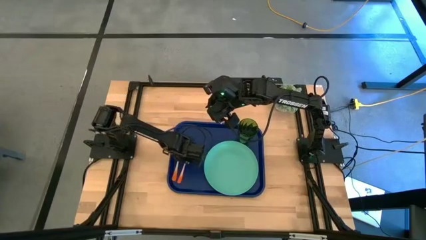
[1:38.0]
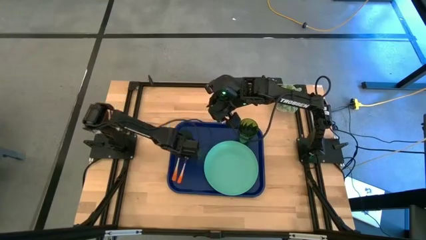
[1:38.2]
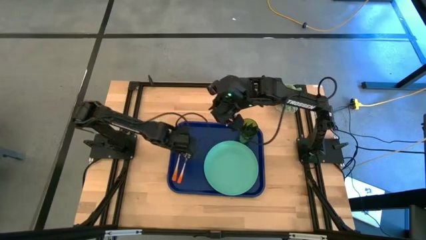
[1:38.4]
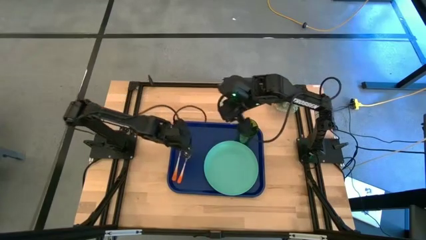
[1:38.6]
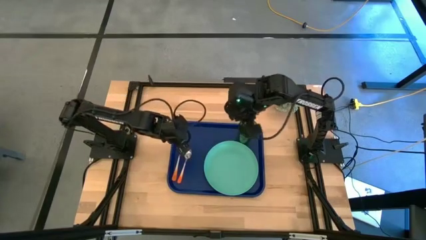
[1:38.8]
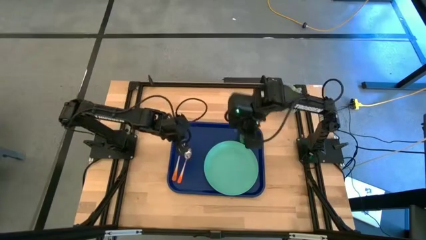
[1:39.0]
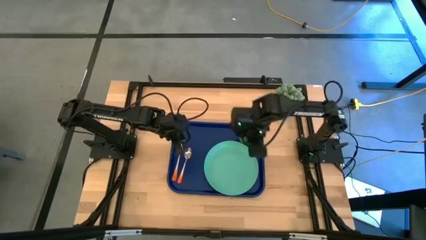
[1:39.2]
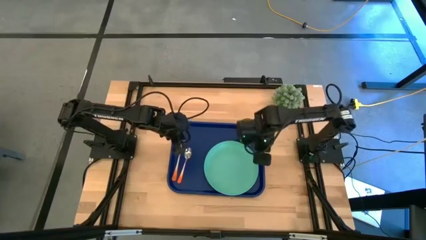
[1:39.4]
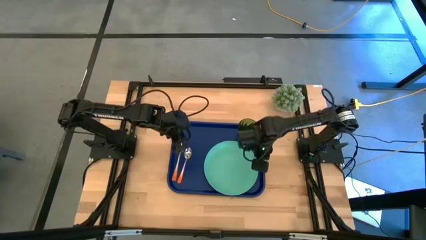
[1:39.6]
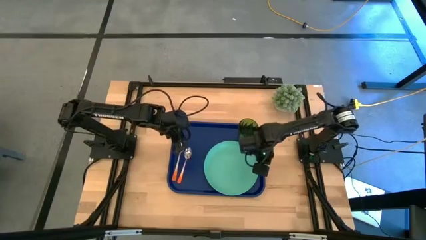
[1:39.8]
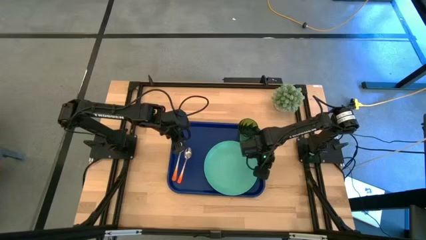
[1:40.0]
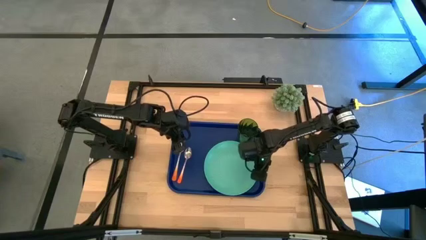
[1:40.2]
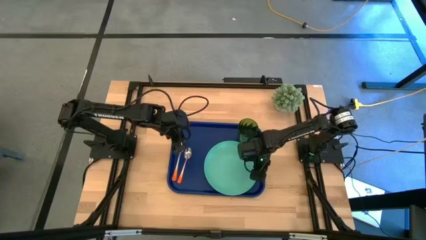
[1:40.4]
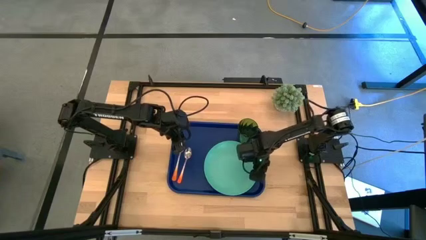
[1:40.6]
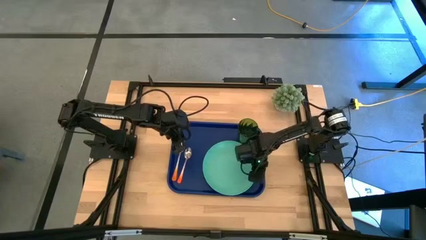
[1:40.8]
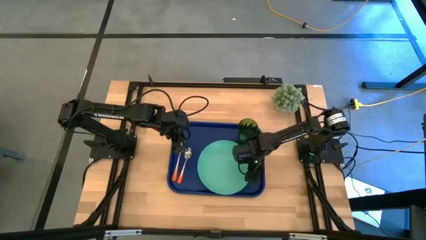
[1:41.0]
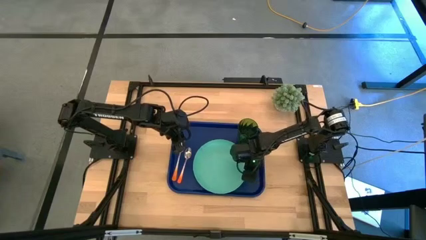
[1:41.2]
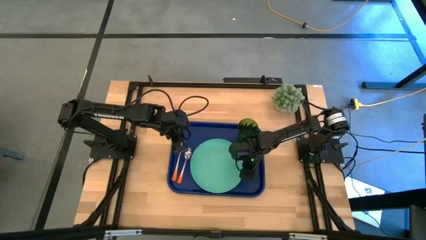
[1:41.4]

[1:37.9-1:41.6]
Task: Pick and place plate/cup/fork/spoon on tray
Adjust the green plate

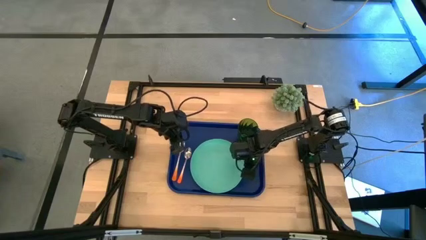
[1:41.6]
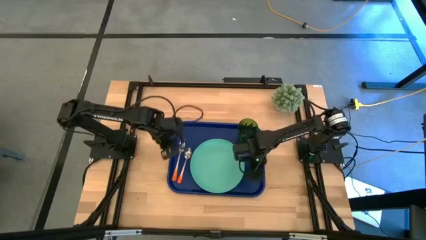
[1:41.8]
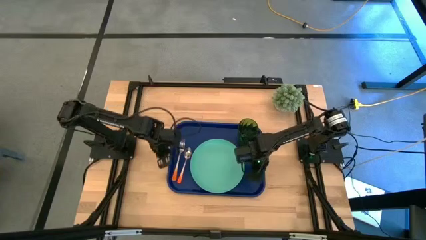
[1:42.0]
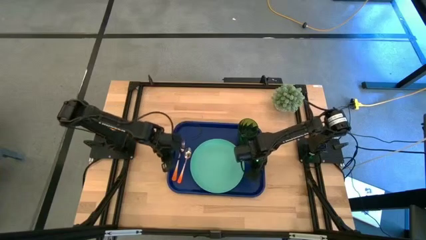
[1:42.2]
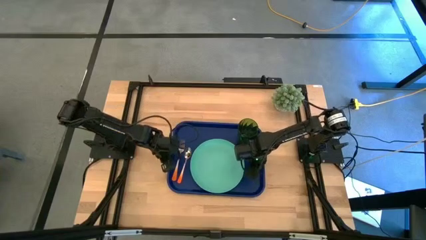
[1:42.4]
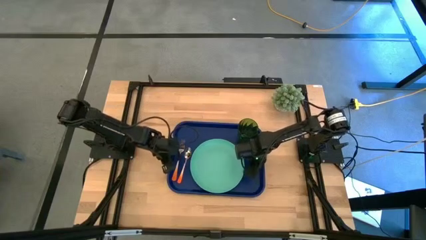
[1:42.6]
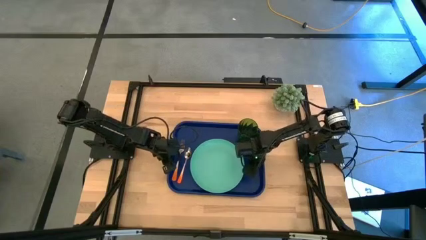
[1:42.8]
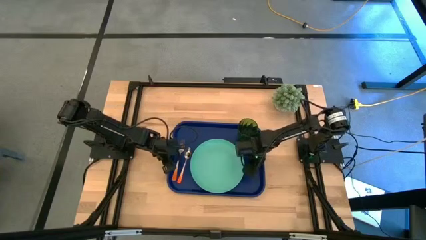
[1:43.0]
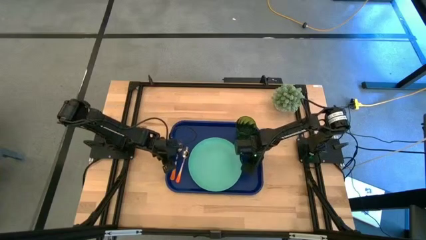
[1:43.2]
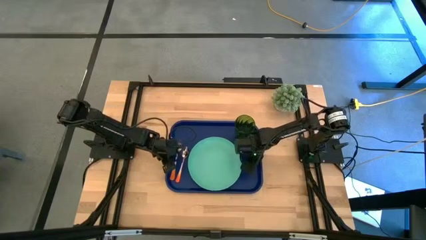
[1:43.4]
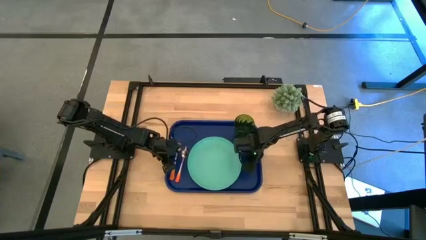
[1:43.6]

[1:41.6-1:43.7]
Adjust the blue tray

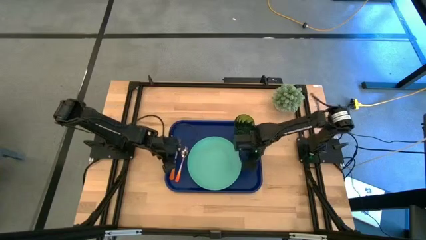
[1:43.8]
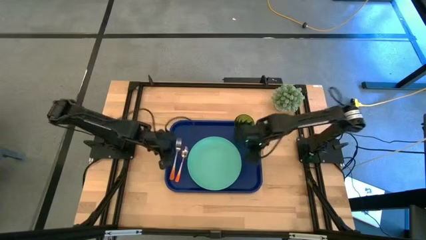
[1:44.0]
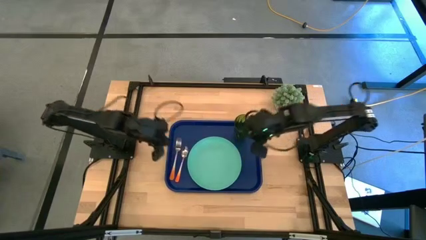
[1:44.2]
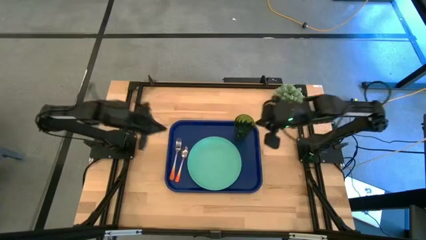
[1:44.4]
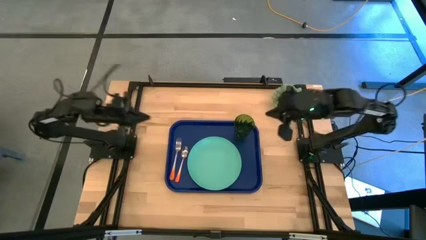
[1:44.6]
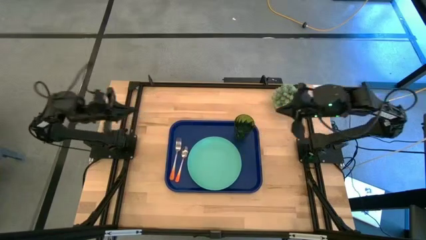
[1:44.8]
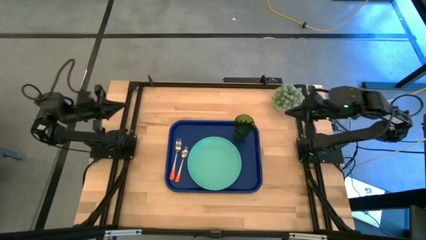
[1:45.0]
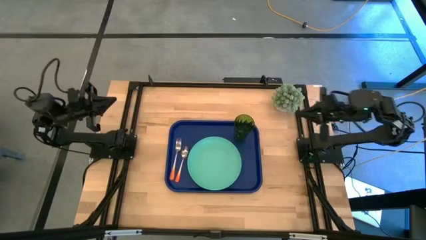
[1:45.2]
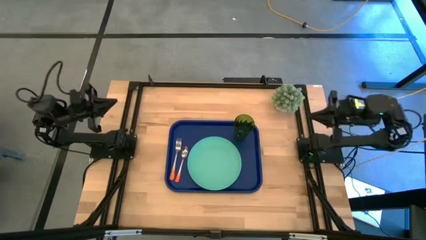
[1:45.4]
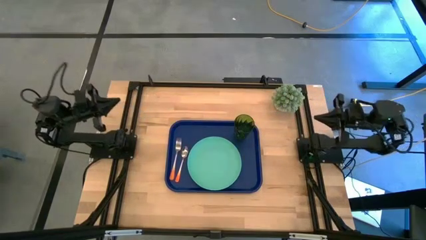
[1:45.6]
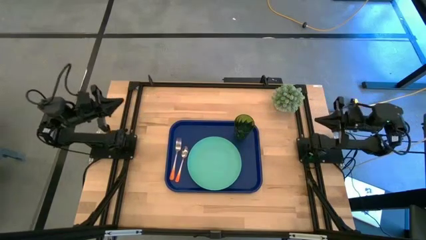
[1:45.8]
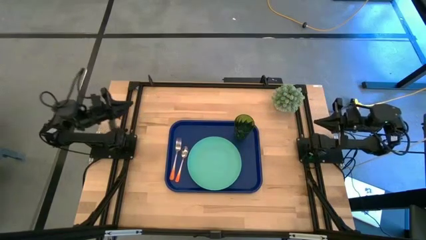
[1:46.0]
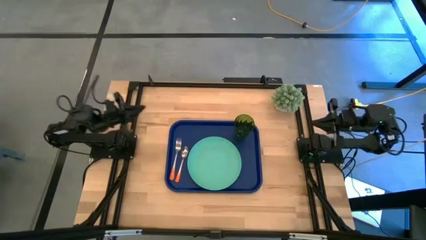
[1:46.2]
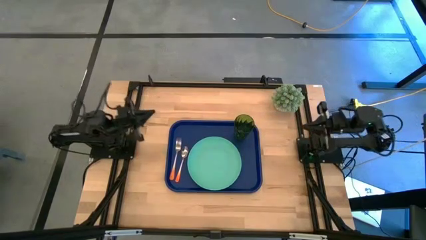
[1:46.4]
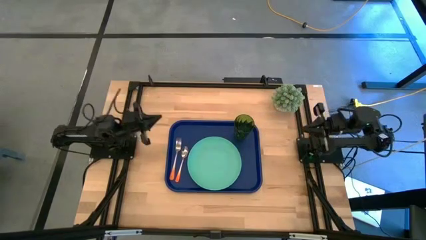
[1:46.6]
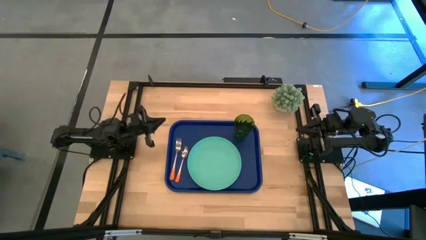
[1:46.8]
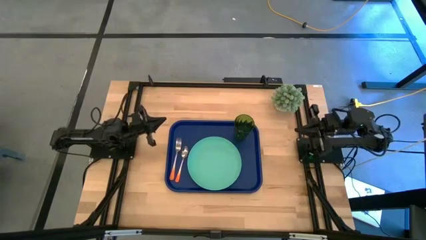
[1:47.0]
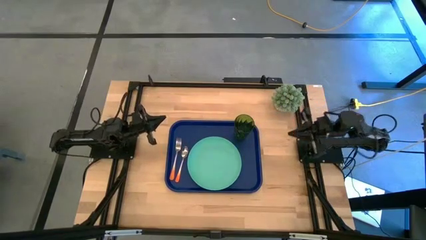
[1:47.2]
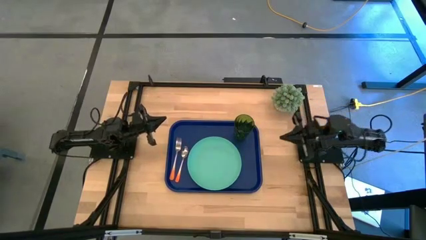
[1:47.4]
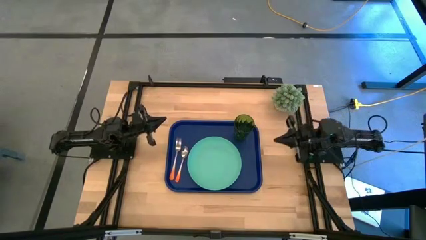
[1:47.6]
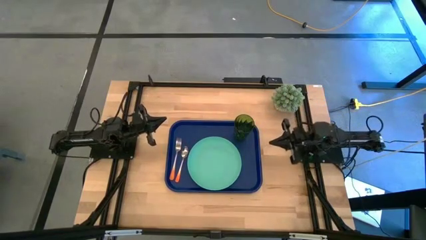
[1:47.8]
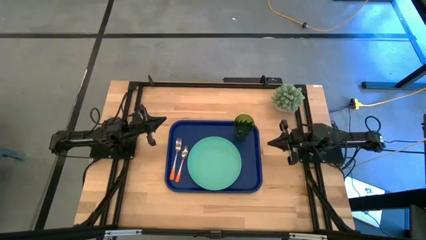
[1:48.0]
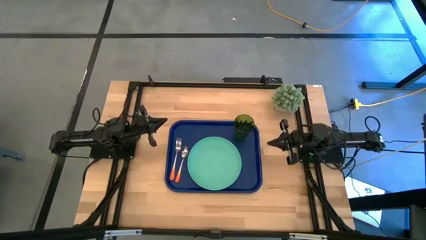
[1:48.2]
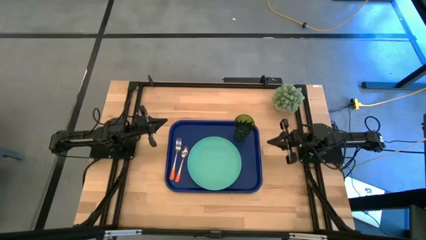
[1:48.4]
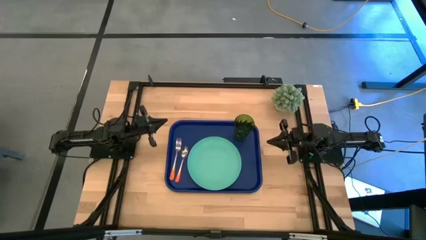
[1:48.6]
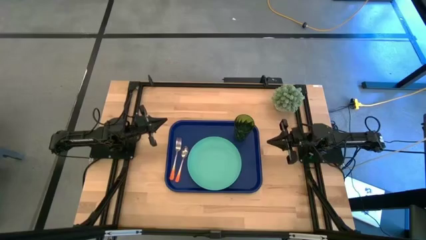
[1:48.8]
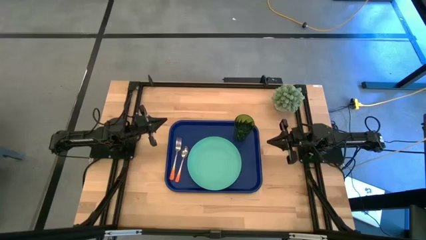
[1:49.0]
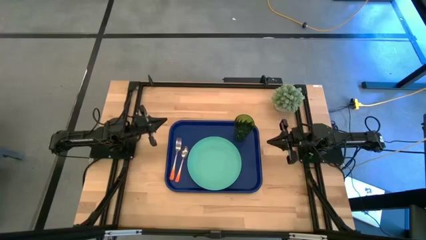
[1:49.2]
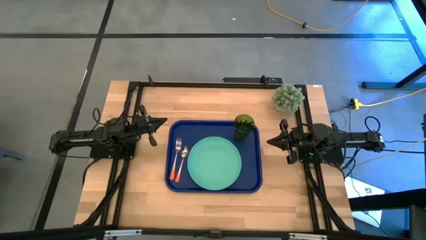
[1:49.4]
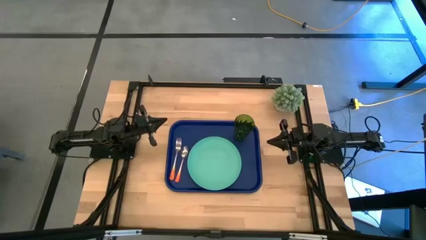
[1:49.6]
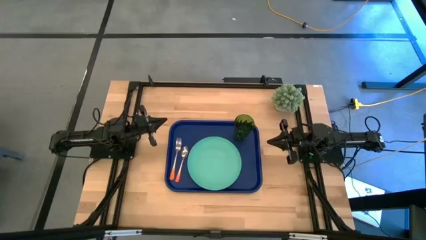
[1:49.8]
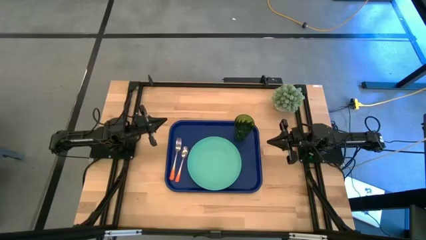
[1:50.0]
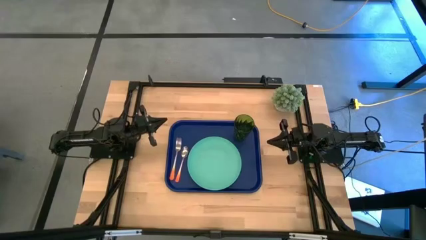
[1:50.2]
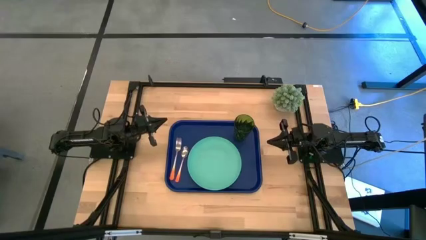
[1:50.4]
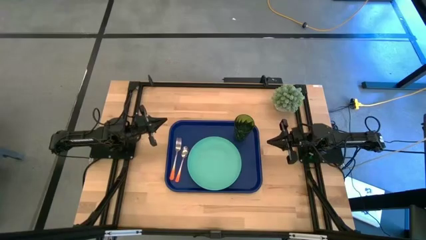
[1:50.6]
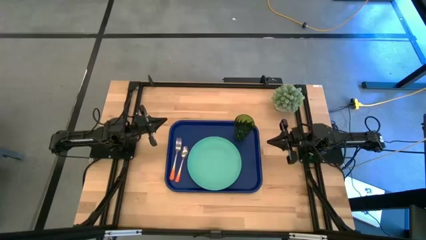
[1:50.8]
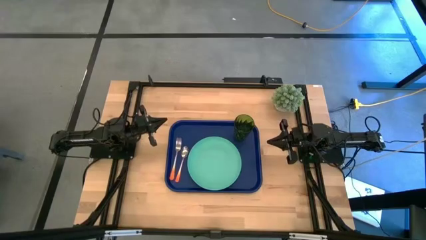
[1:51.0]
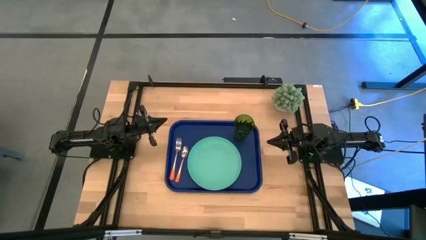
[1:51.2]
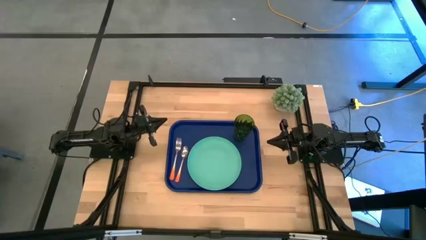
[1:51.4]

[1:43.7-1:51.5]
Return to Home Position

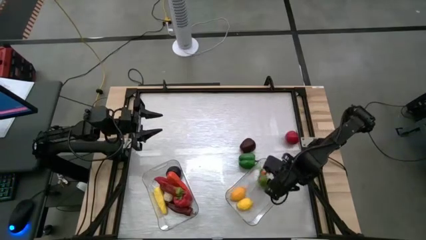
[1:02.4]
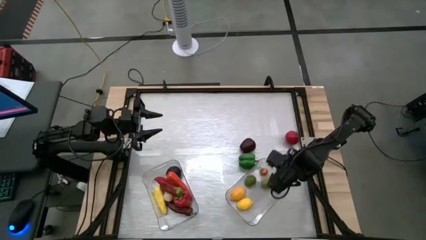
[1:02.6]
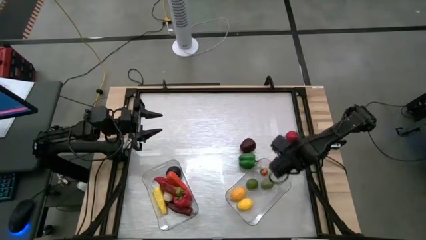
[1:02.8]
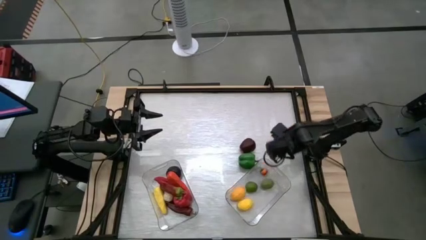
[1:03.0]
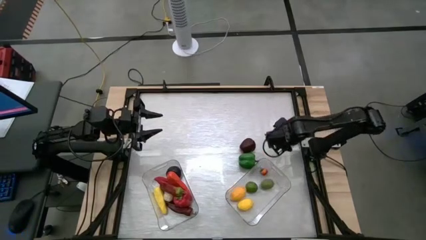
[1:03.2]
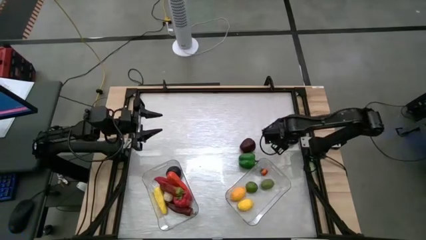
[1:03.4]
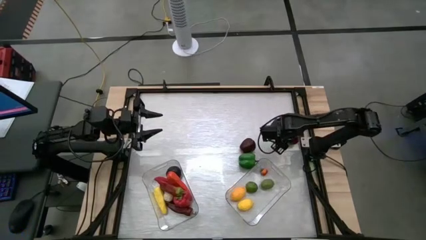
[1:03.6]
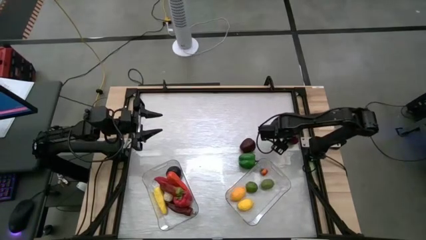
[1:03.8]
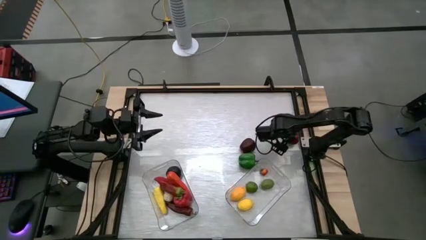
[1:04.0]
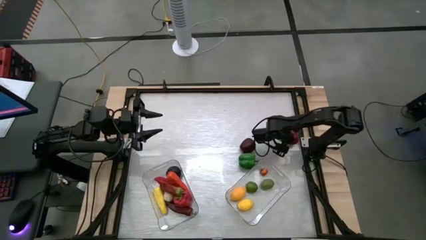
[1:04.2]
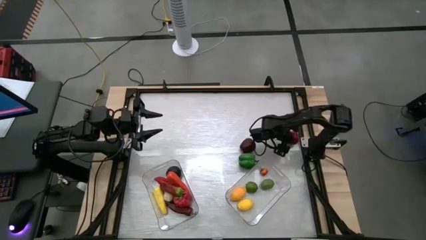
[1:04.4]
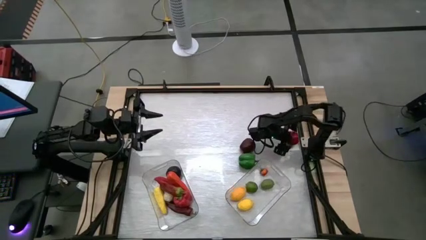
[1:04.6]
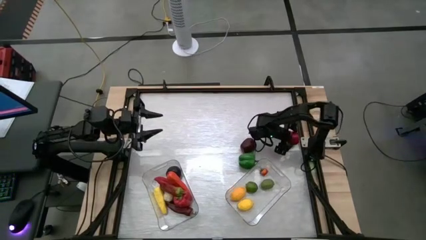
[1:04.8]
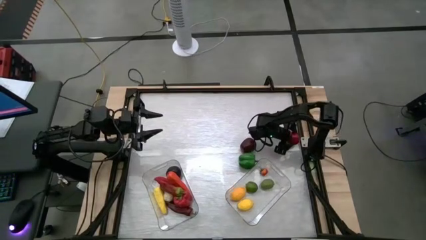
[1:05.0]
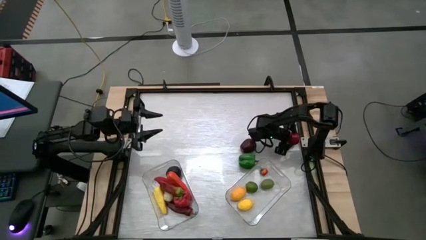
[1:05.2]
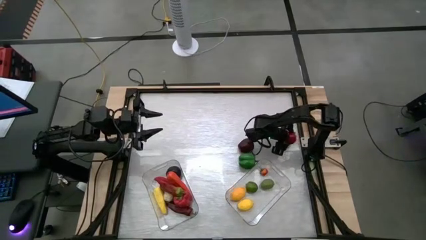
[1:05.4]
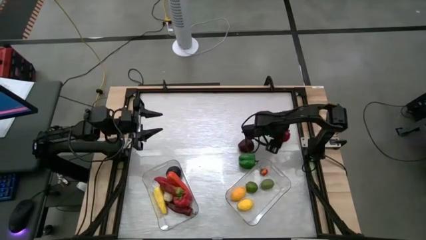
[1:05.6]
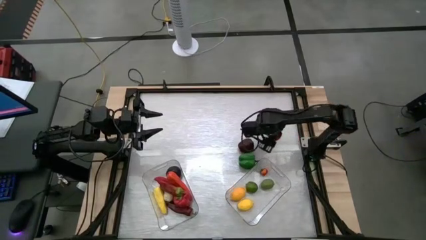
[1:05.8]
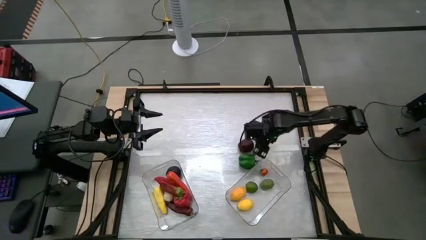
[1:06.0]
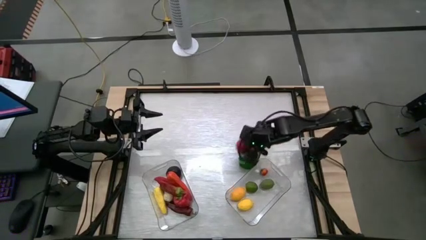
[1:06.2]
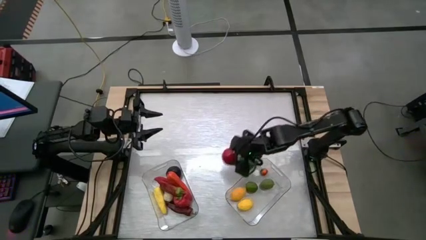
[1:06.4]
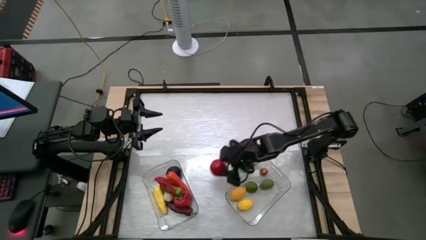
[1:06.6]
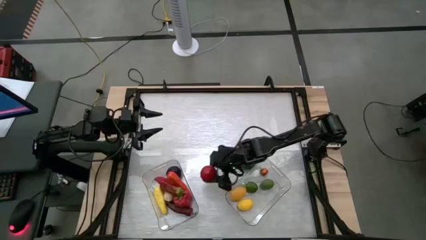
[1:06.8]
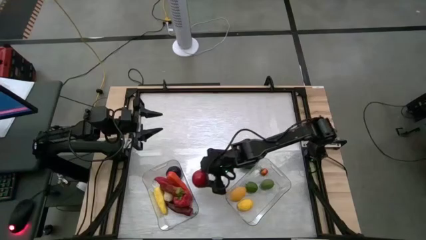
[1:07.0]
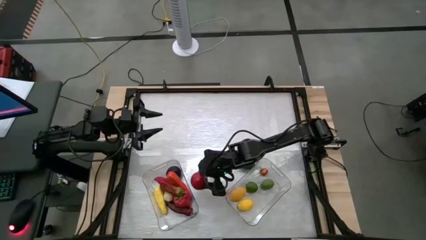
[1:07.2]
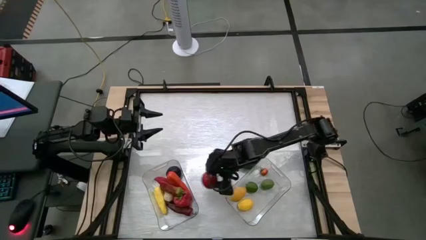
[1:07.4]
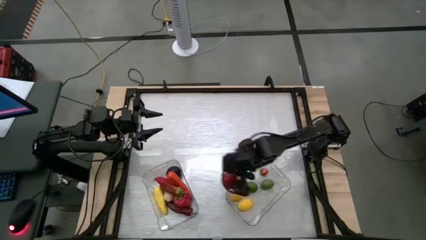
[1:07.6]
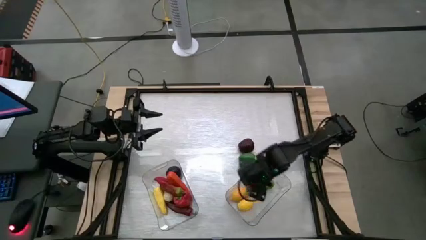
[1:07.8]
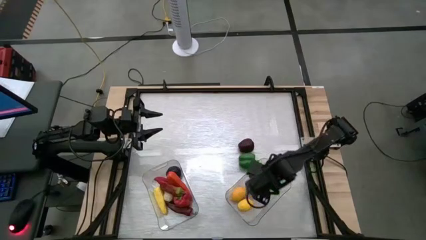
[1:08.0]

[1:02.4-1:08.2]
Task: Sort produce into baskets
Put the tomato into the right transparent bin
